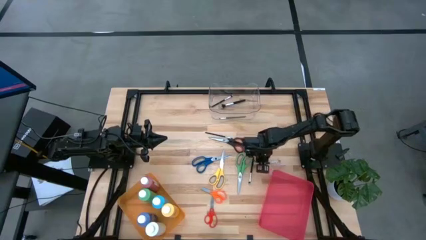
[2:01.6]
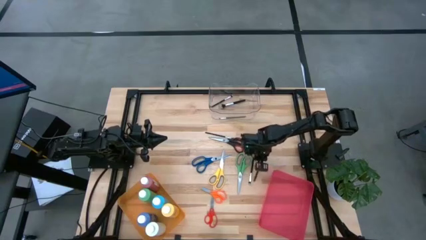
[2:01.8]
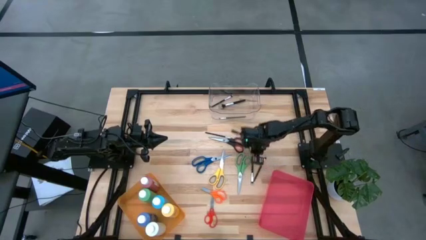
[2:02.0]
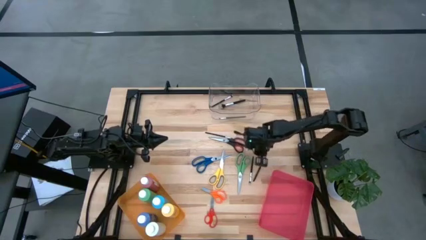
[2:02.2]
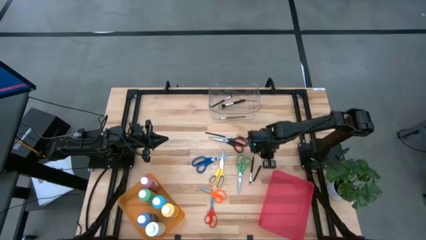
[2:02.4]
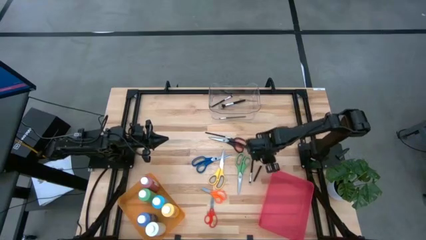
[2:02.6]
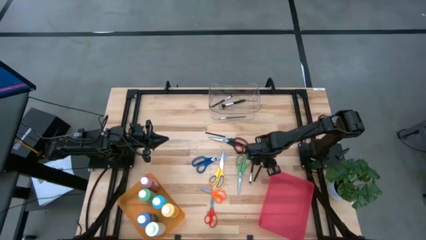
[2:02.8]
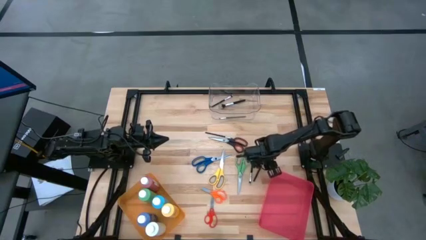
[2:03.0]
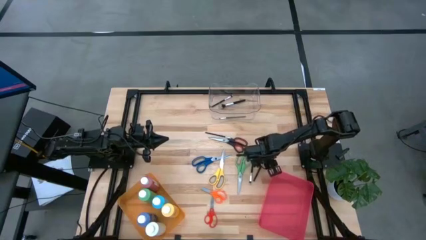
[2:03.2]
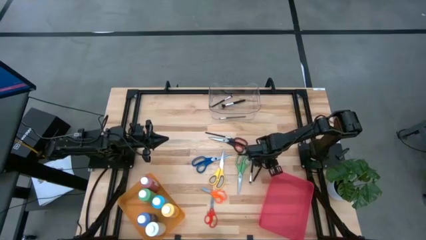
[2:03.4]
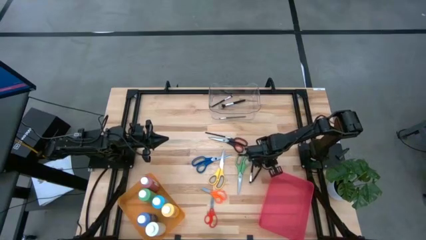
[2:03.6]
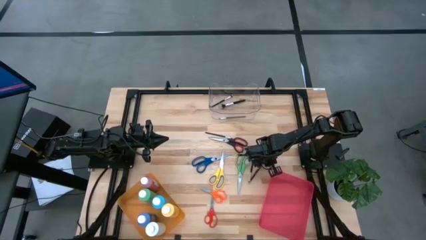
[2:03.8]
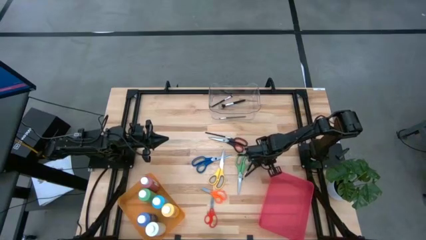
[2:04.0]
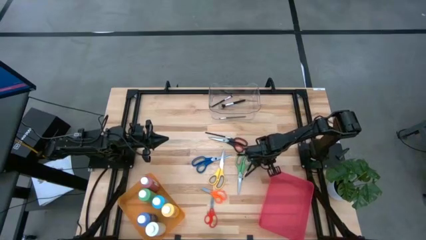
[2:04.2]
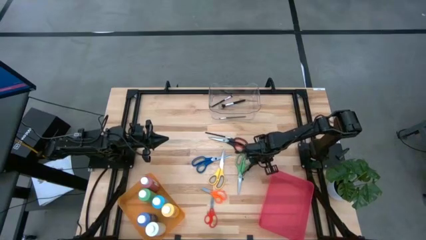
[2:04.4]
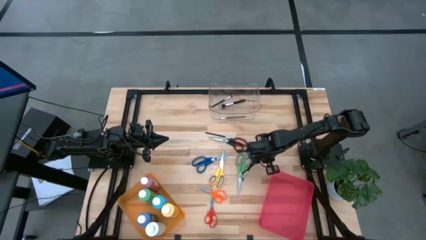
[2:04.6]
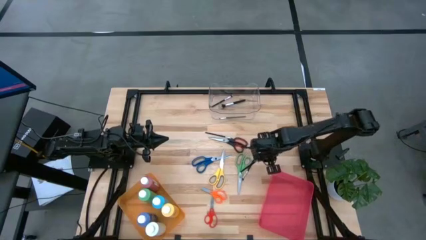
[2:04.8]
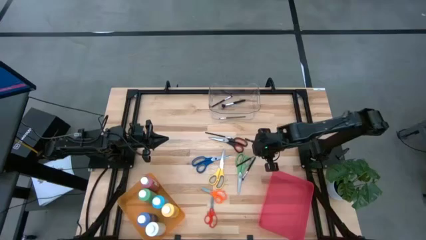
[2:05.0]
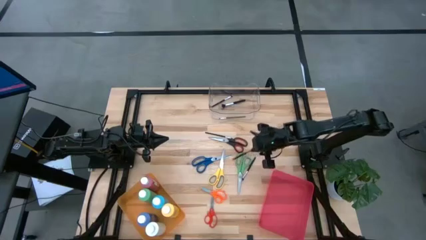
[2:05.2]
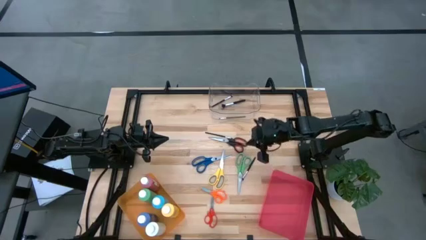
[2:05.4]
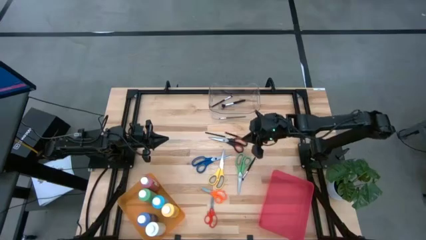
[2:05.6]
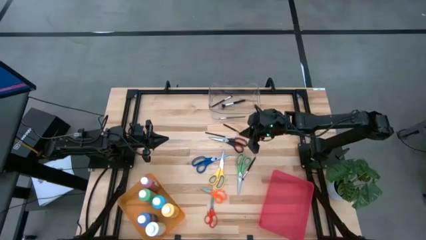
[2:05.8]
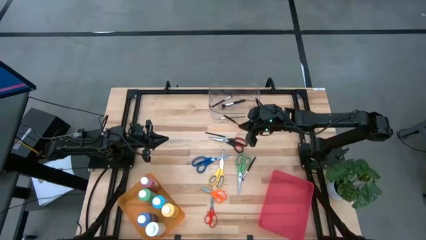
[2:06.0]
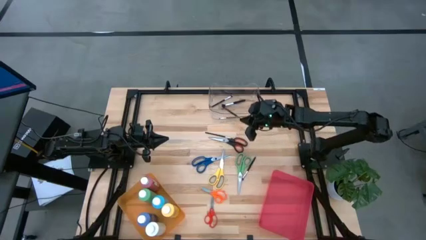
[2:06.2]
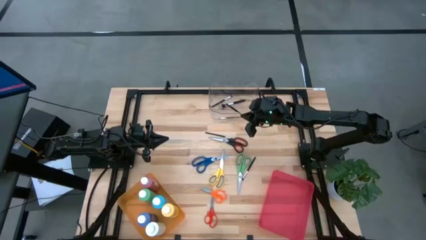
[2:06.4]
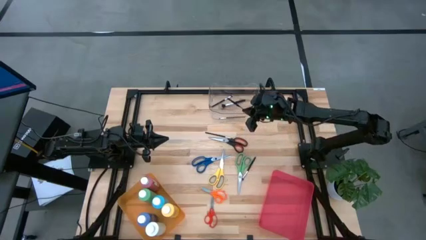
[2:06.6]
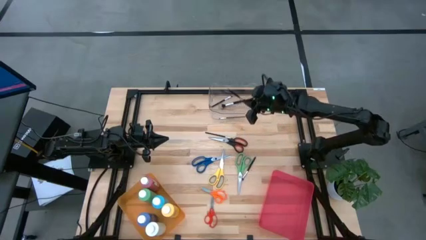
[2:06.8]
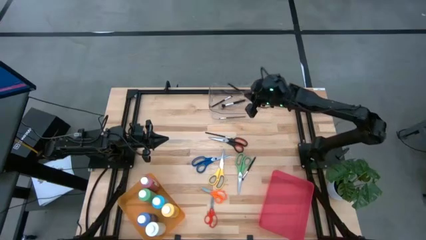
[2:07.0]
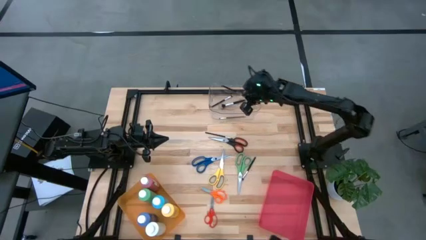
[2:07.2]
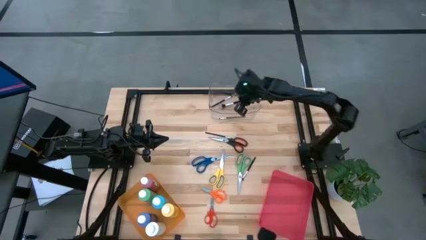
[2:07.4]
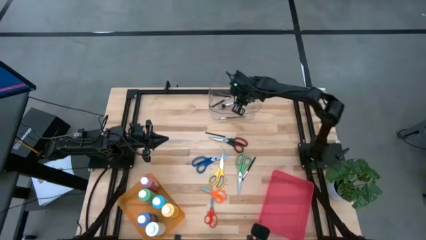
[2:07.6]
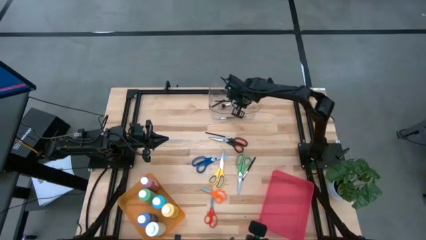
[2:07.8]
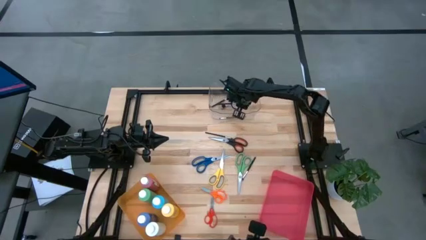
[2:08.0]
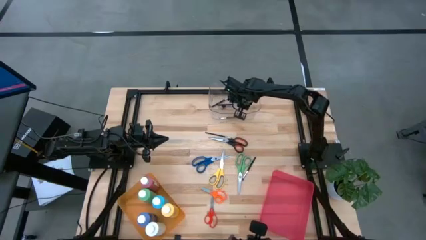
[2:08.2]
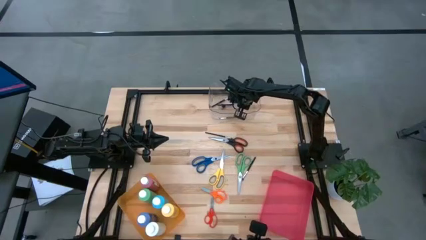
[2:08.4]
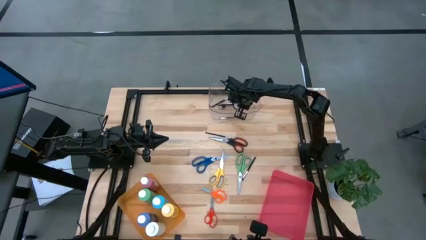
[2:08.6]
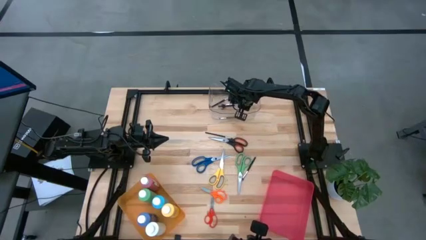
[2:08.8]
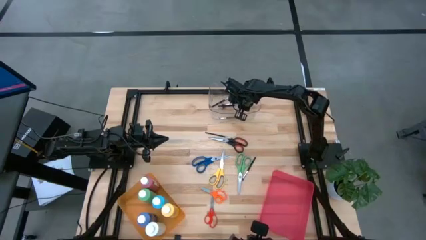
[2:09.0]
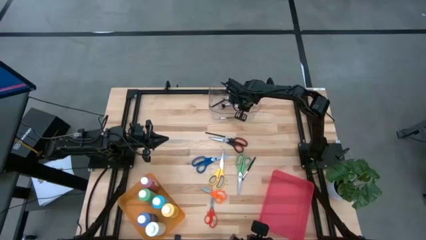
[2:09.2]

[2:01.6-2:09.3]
Task: Pick & Place Paint Supplies
Put the eyeshadow brush into the transparent bin

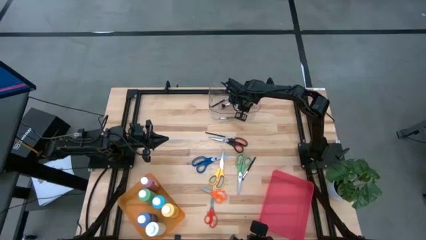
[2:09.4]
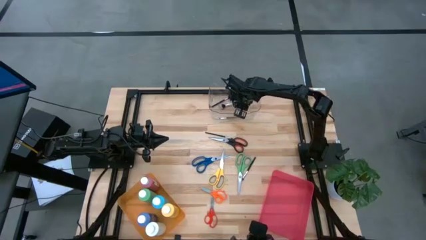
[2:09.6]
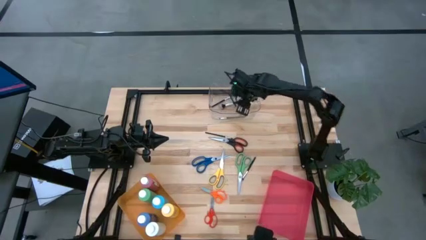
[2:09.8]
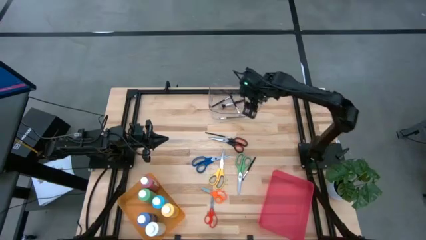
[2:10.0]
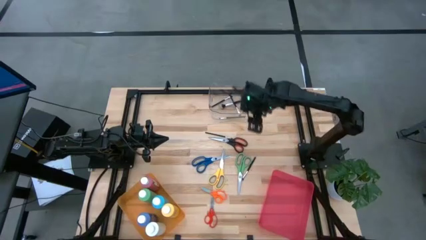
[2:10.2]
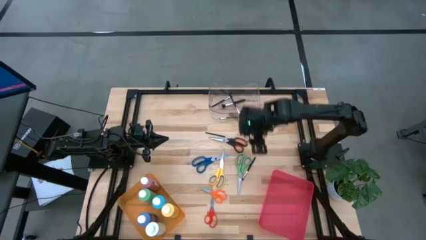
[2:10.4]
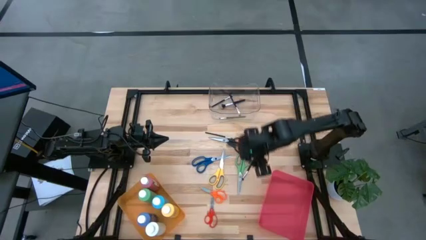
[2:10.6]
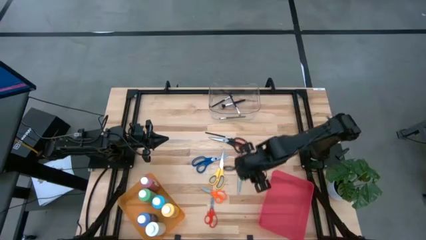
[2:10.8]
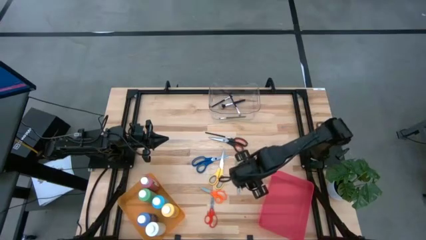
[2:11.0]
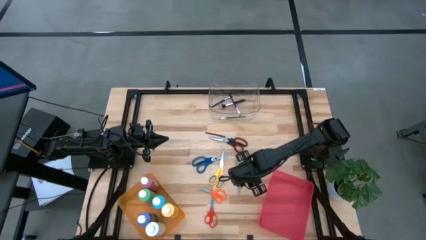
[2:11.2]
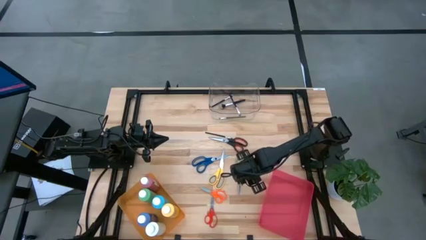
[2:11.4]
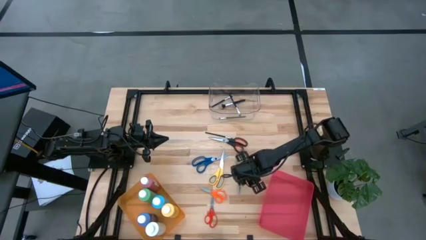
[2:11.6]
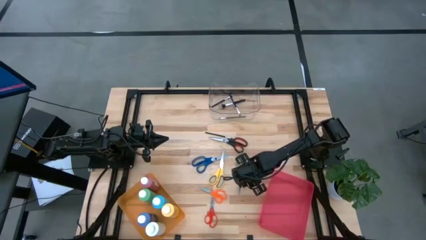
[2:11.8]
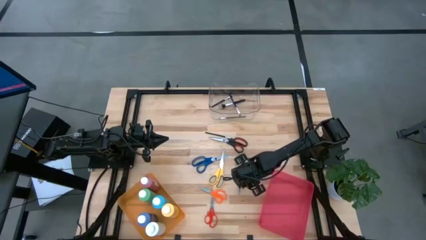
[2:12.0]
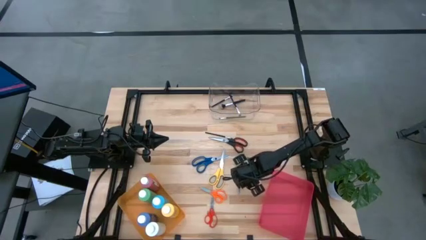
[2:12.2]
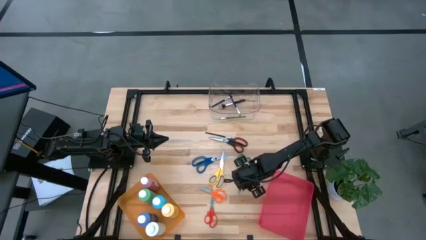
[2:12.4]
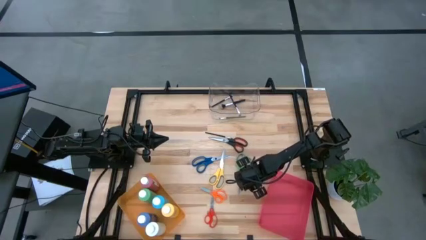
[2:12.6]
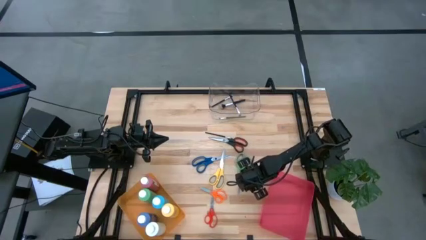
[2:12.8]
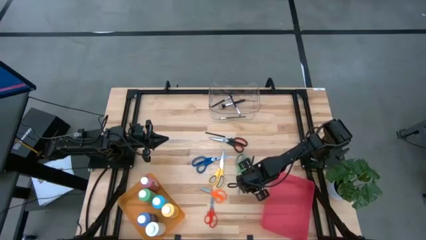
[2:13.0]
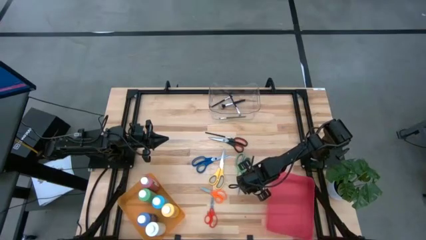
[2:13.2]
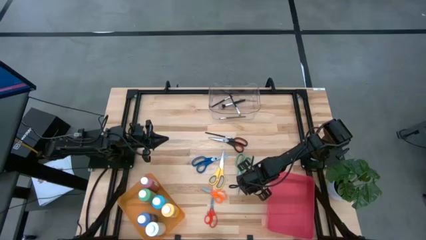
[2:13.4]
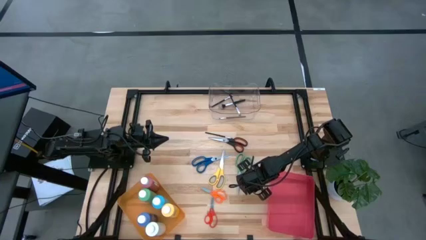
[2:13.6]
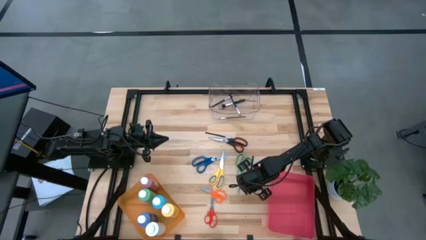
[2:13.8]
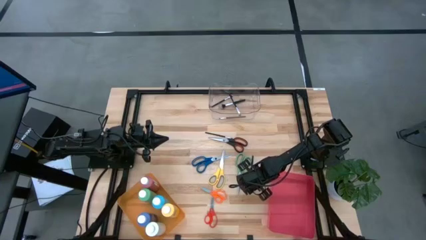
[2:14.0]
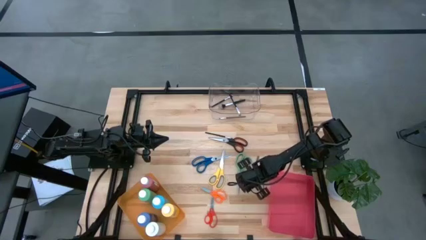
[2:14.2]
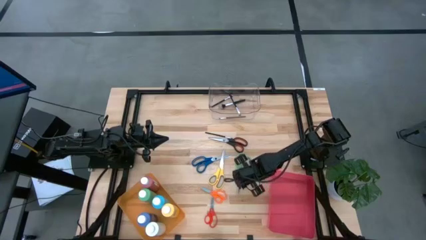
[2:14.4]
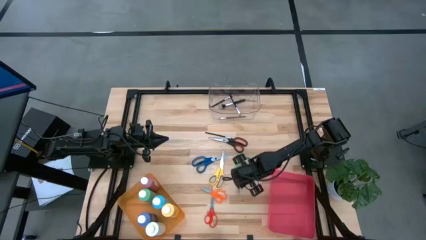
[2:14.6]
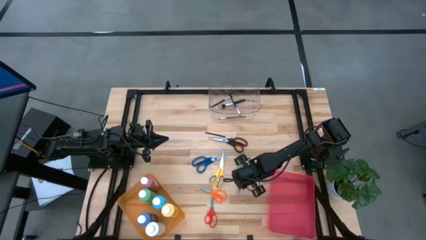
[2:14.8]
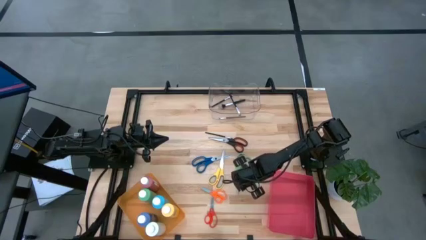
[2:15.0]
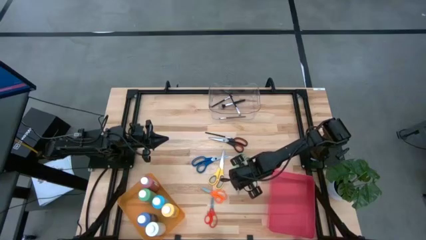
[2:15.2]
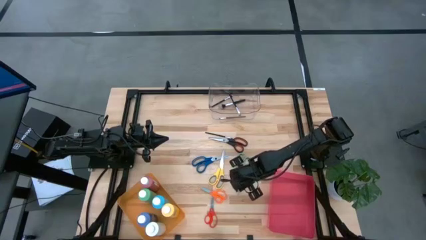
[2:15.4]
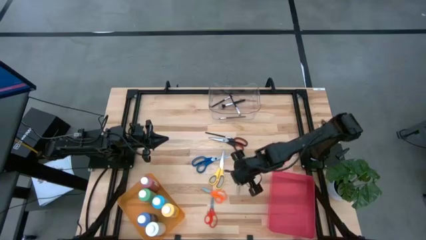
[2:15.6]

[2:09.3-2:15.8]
Put the eyeshadow brush into the transparent bin

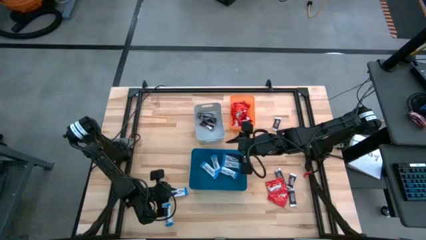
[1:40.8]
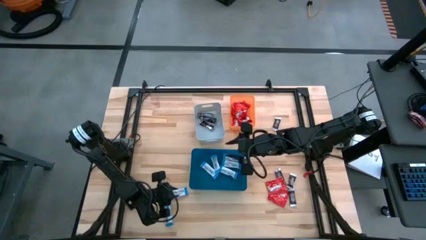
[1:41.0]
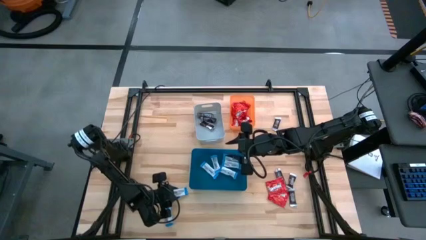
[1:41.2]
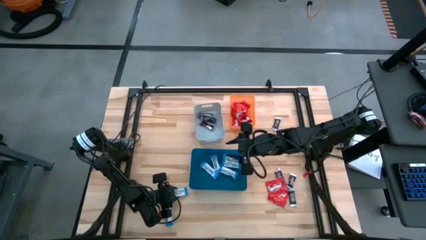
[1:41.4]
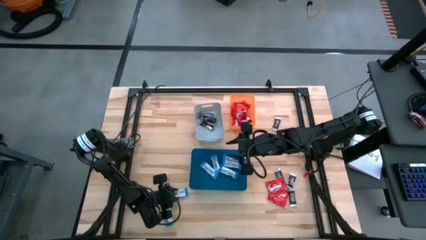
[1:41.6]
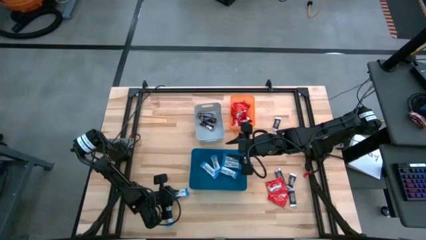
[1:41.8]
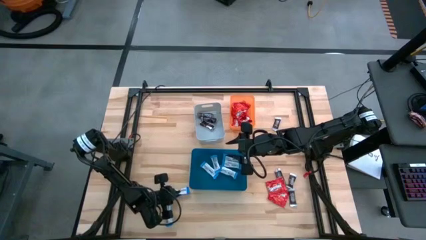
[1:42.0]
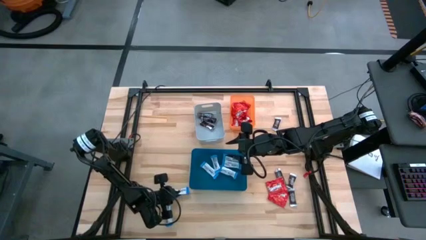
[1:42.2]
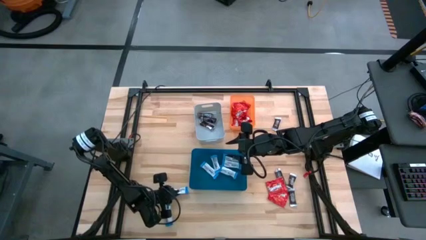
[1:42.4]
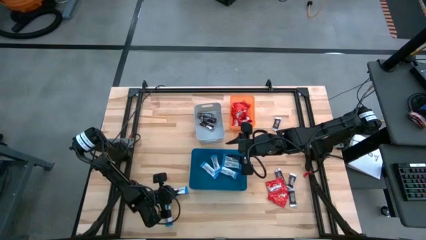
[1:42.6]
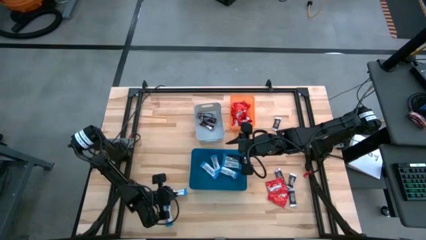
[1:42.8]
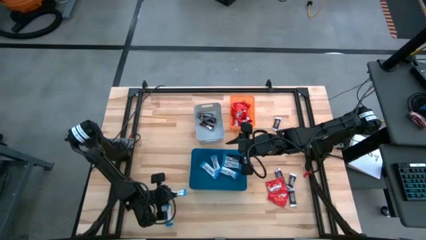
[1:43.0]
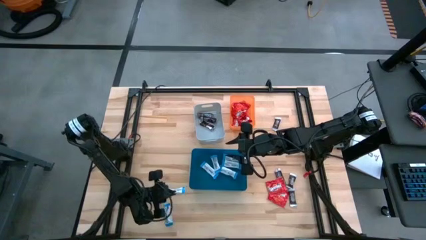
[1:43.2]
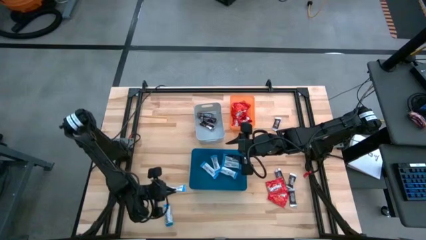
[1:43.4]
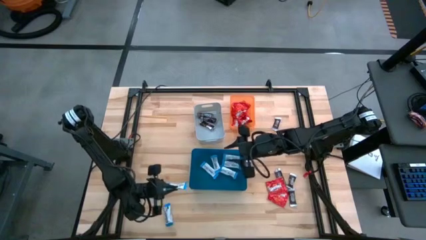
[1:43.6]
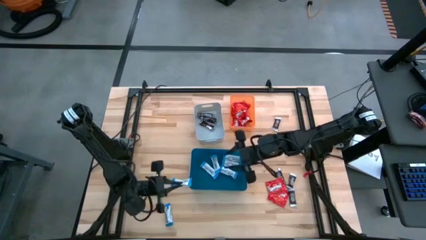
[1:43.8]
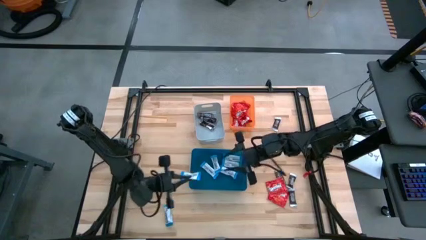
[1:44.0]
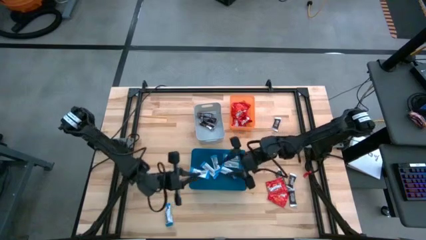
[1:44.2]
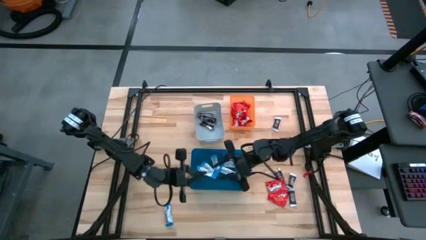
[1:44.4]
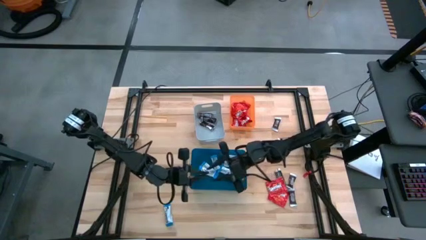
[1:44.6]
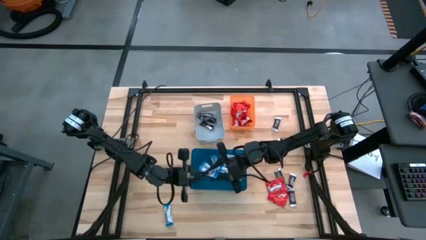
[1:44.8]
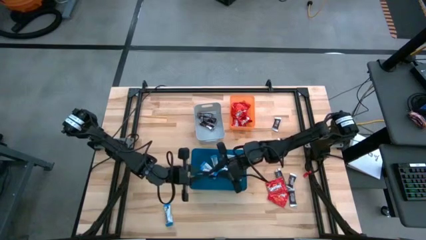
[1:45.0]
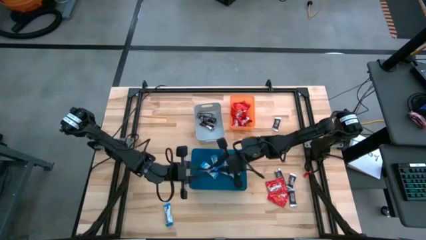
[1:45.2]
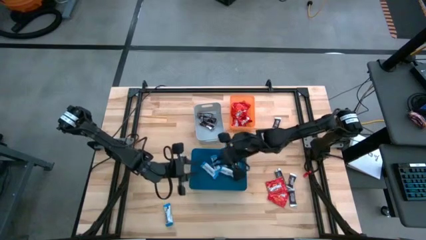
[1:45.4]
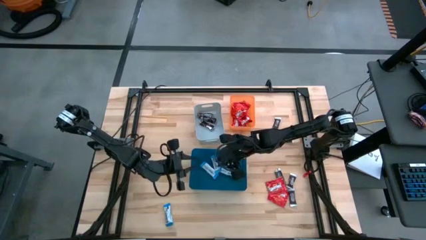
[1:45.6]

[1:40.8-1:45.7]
Task: Sort candy
Put the white chocolate bar into the blue bin
